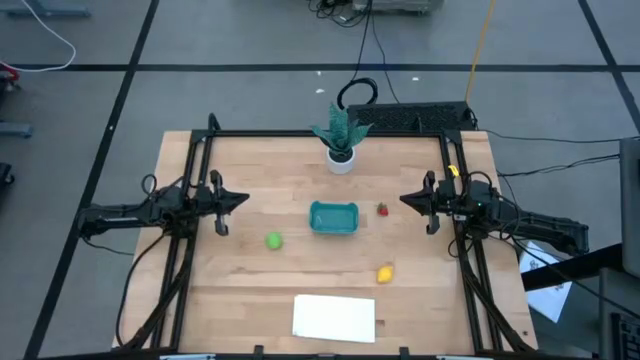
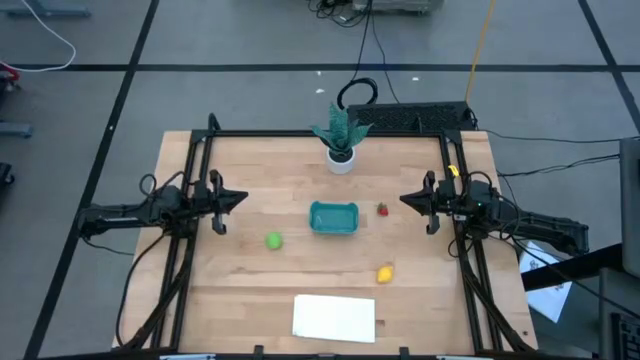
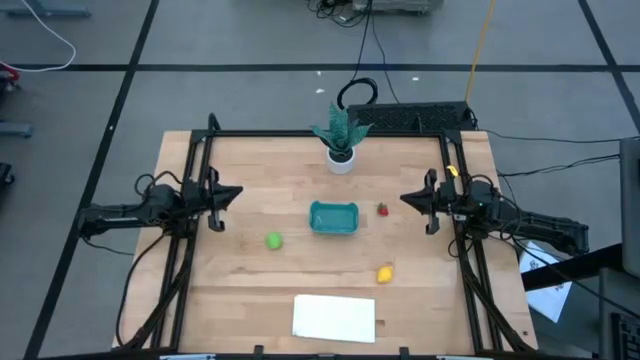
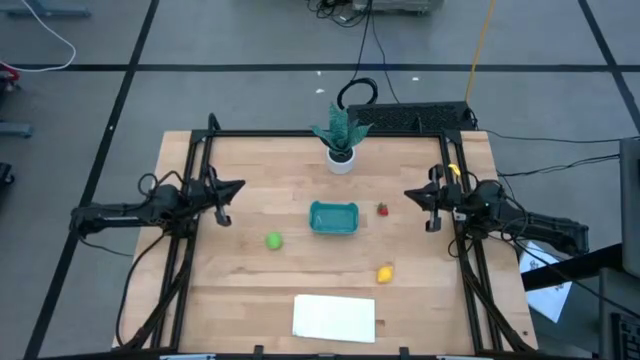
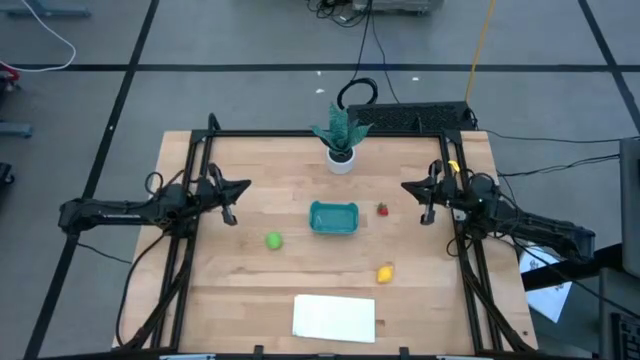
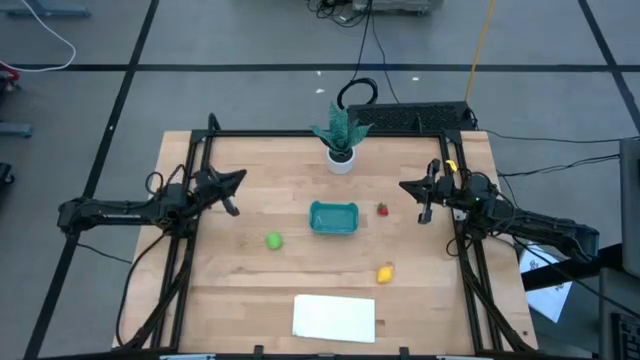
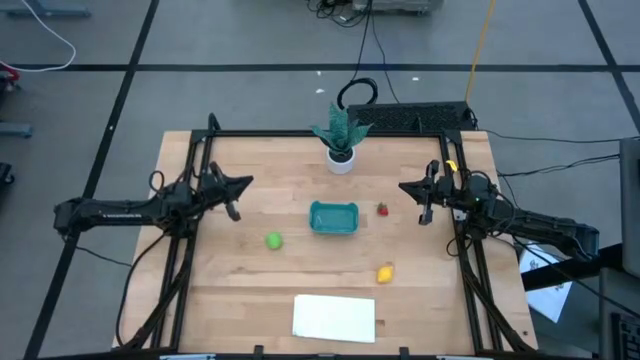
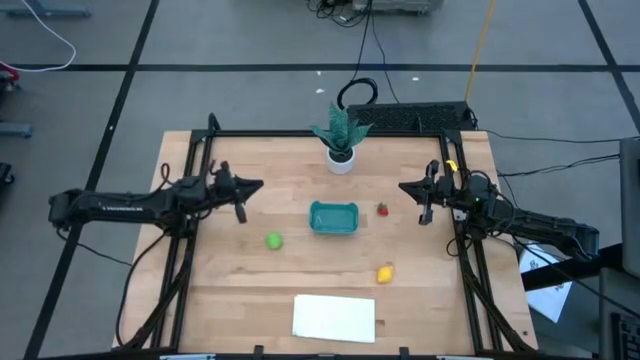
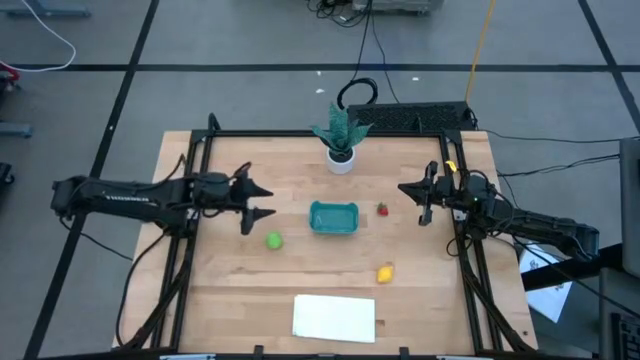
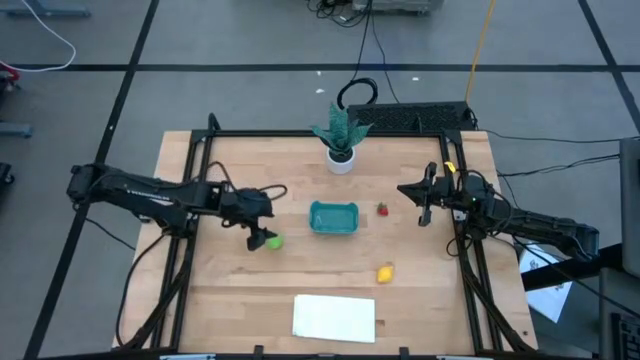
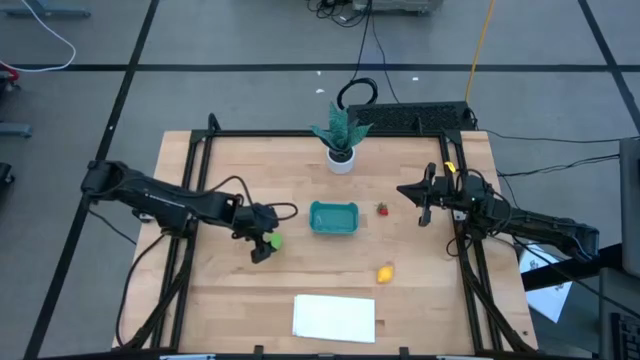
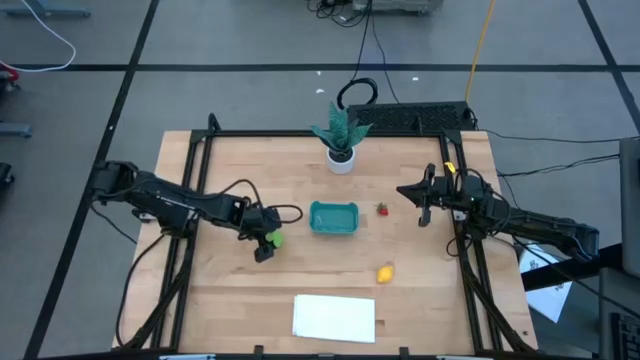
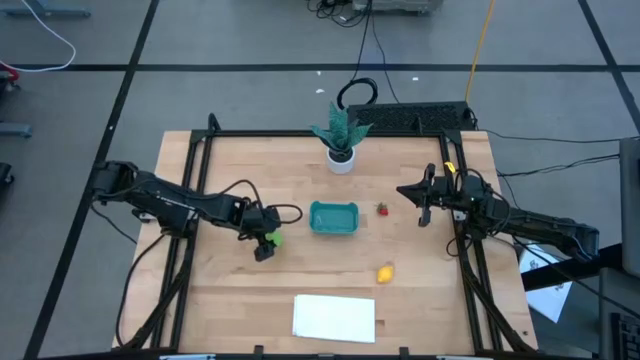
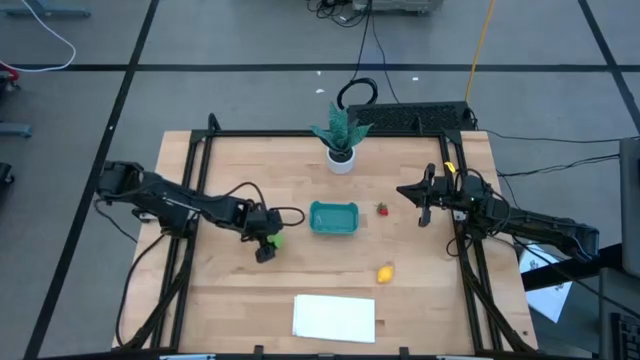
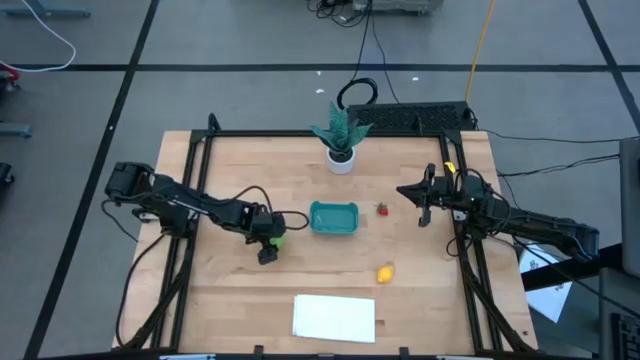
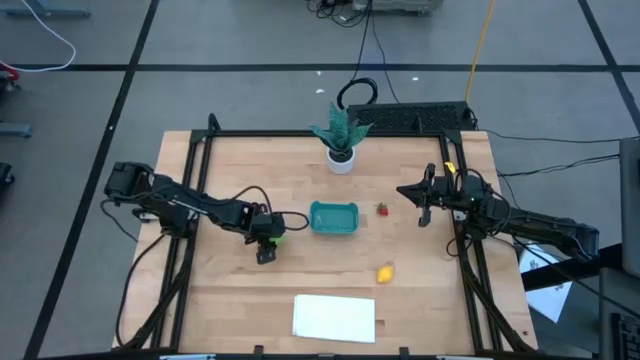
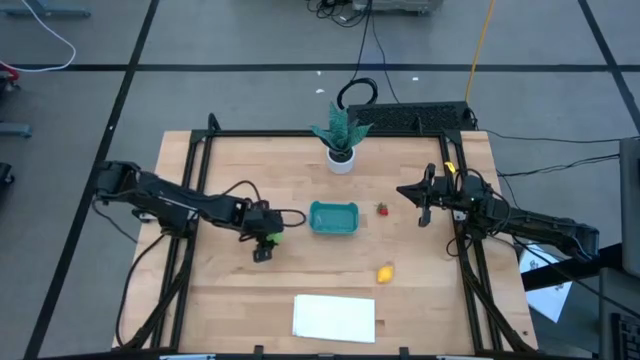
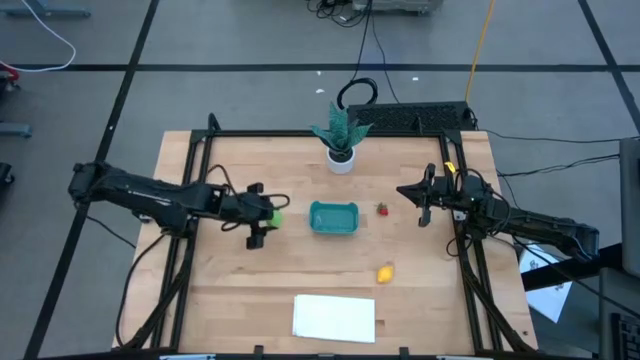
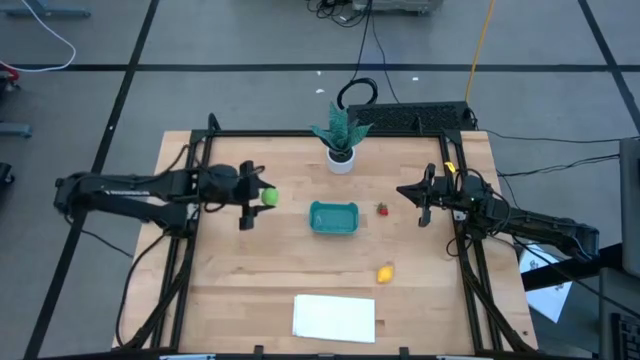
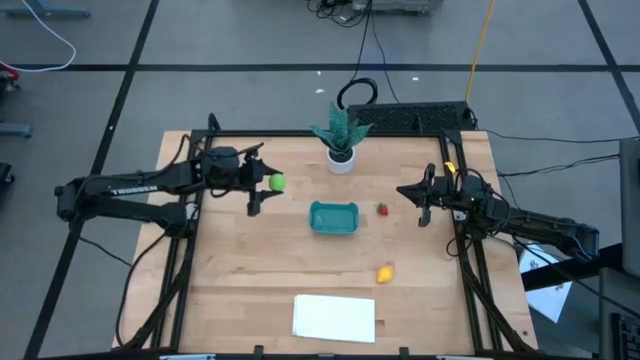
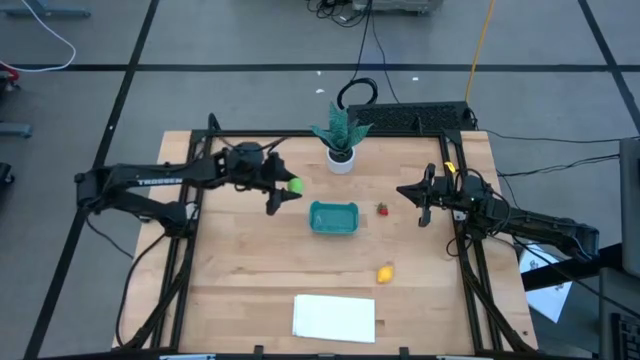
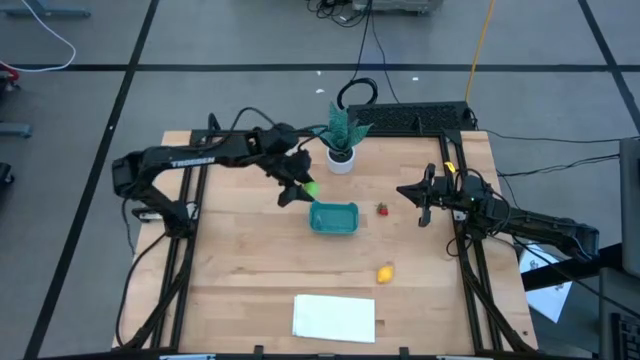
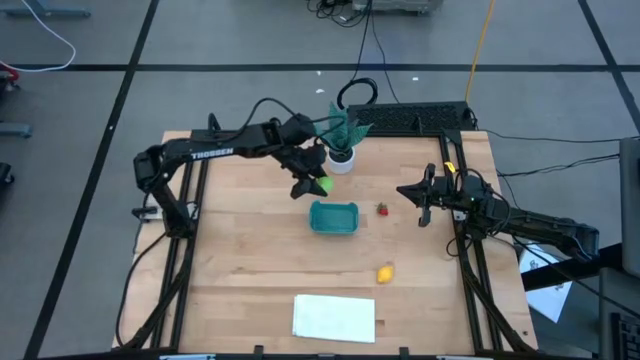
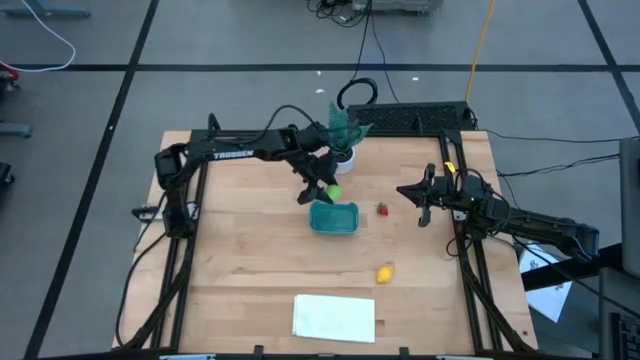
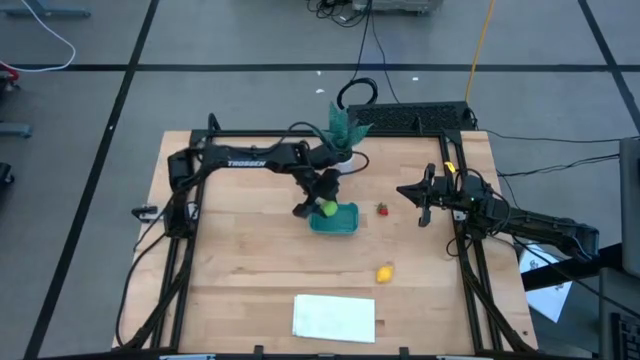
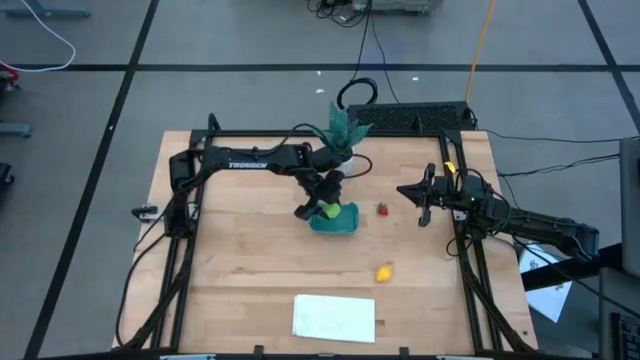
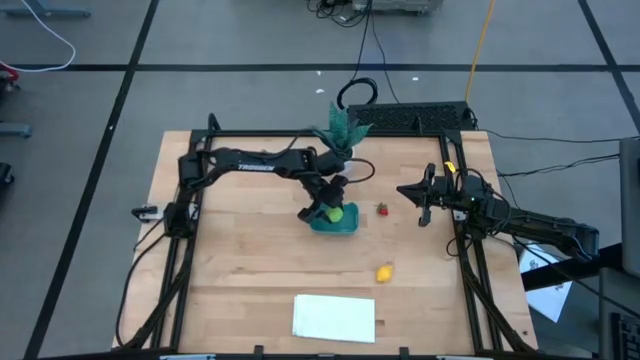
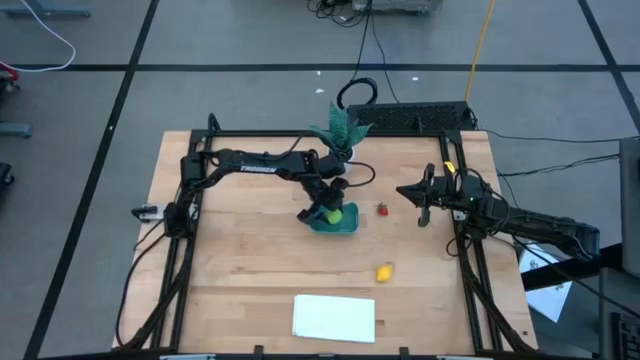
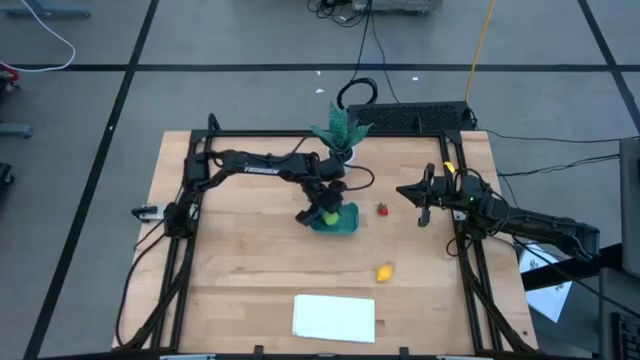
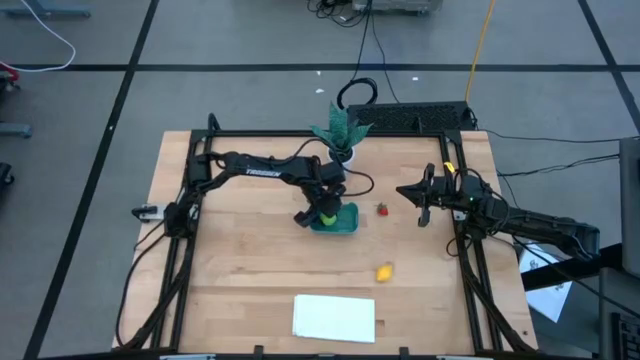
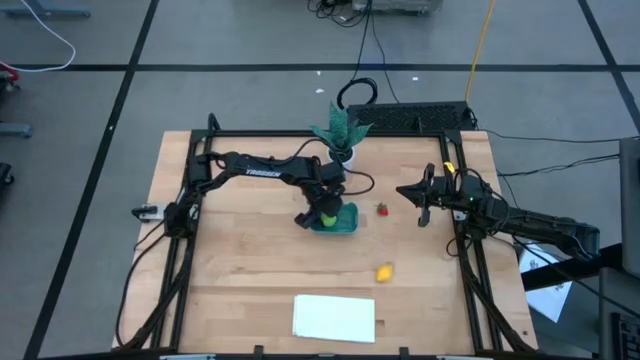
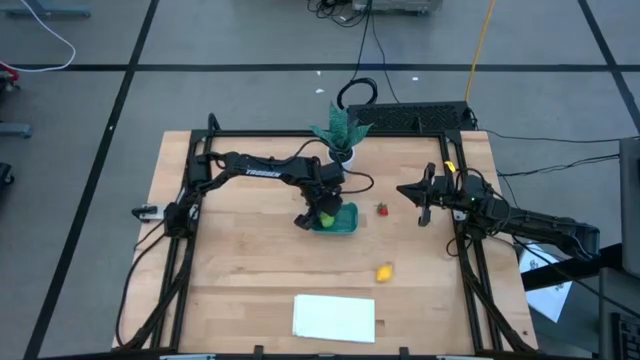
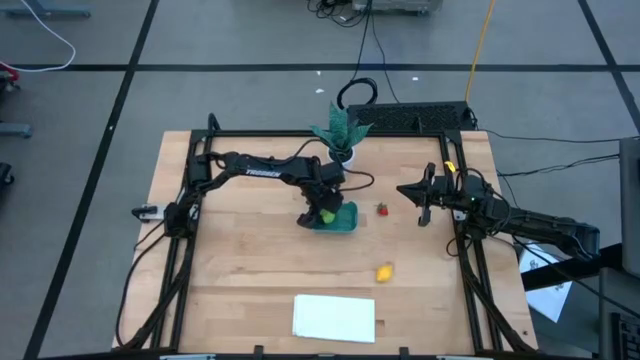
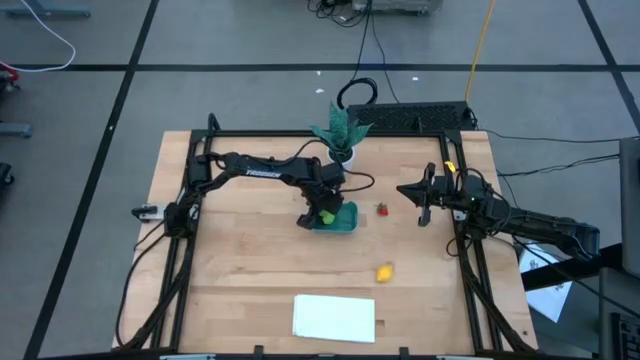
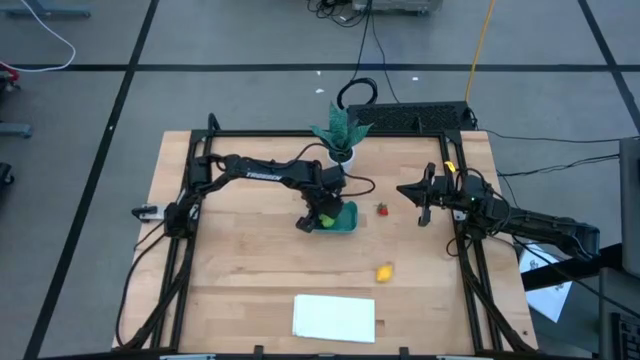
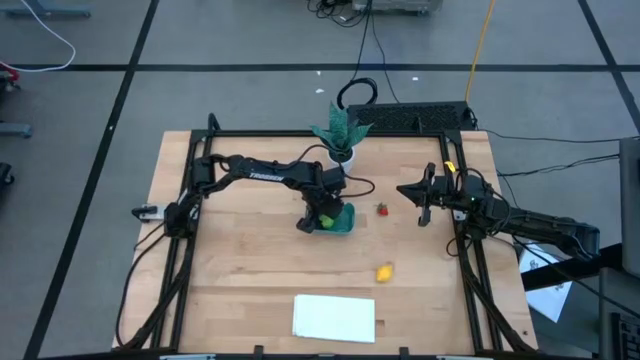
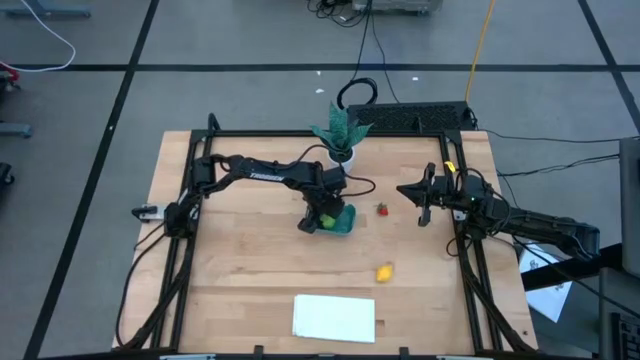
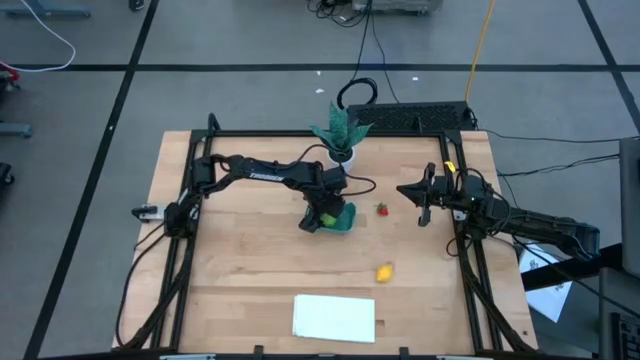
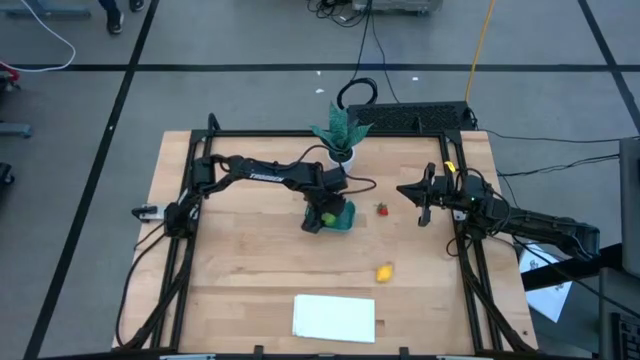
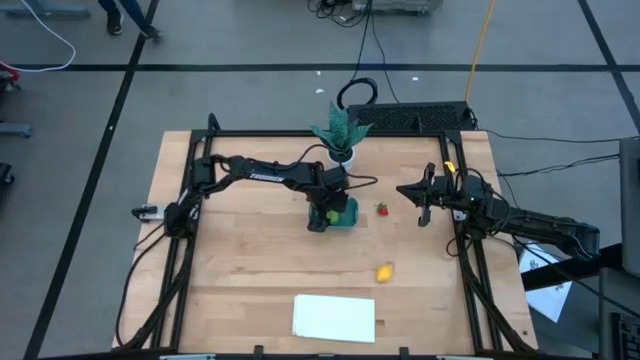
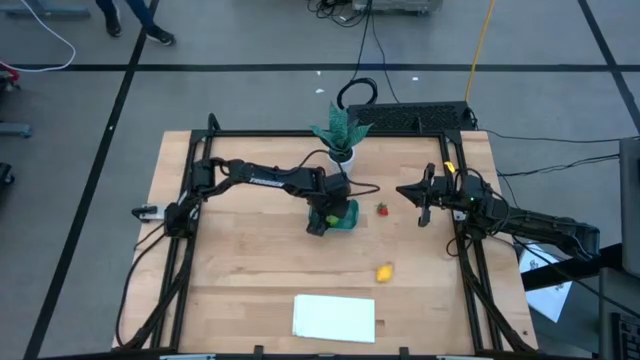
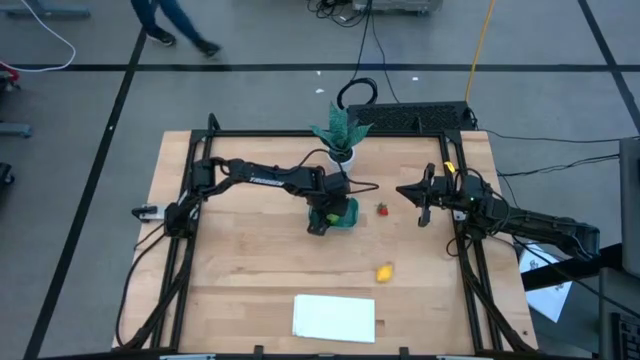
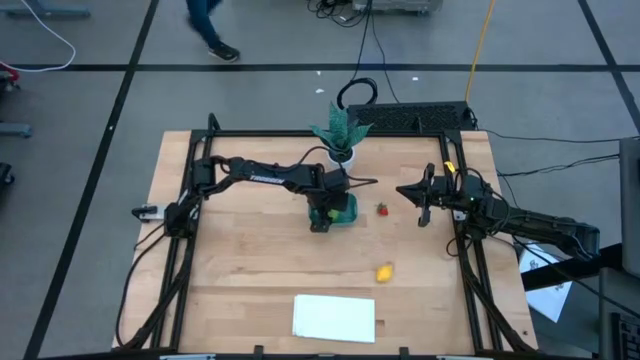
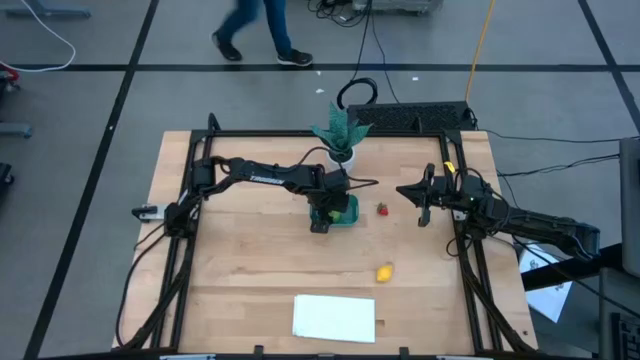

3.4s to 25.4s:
Task: Pick and placing Produce into tupperware
Put the green cabbage into the green bin
